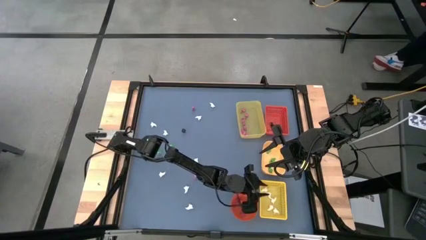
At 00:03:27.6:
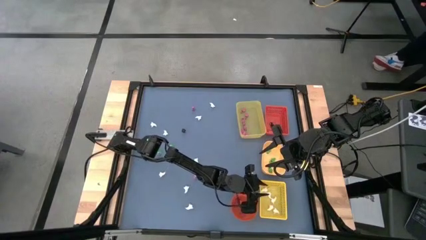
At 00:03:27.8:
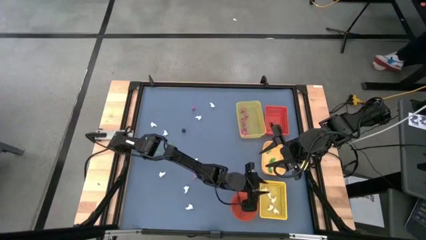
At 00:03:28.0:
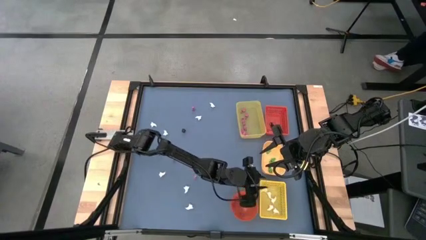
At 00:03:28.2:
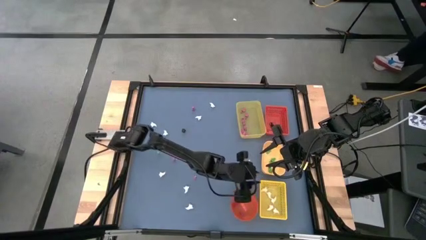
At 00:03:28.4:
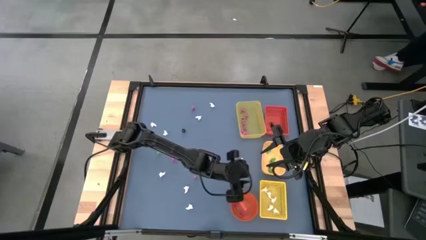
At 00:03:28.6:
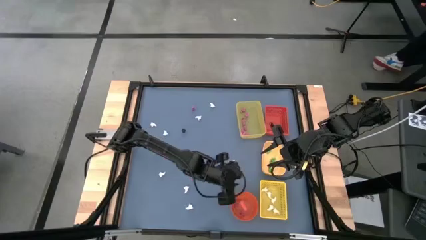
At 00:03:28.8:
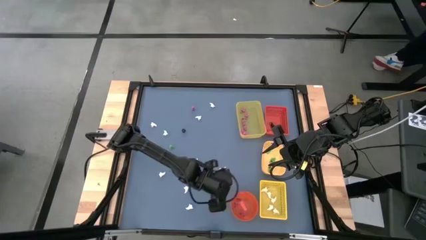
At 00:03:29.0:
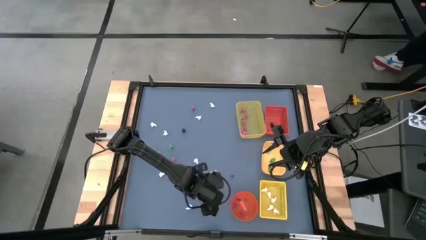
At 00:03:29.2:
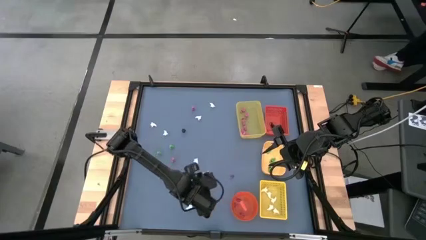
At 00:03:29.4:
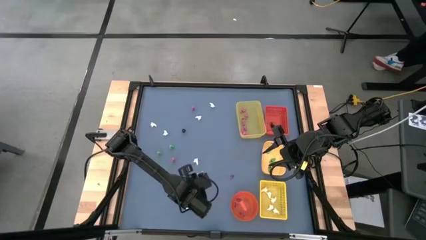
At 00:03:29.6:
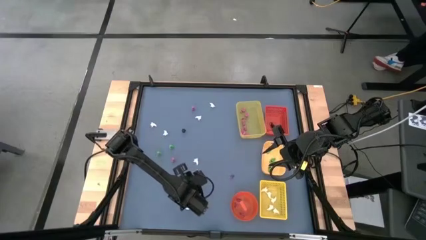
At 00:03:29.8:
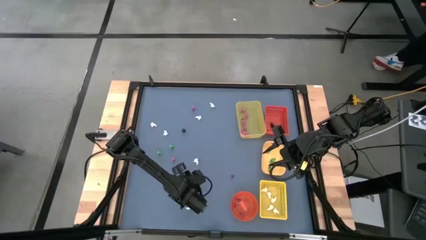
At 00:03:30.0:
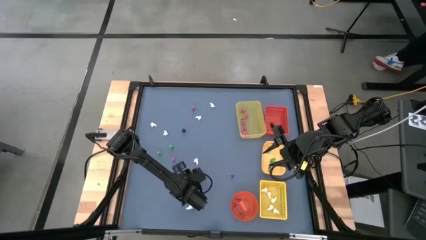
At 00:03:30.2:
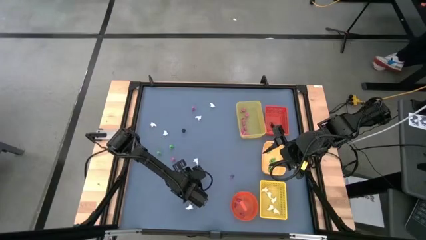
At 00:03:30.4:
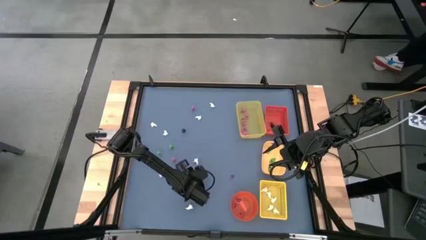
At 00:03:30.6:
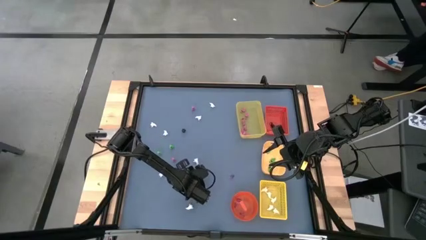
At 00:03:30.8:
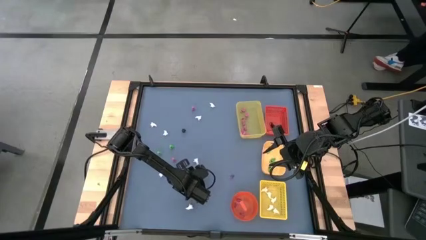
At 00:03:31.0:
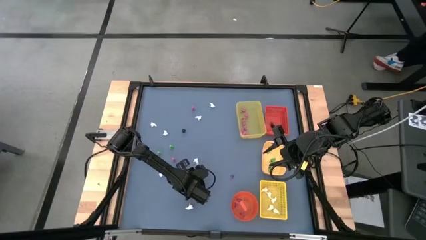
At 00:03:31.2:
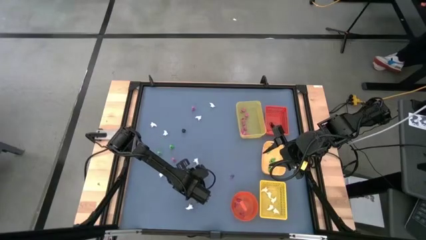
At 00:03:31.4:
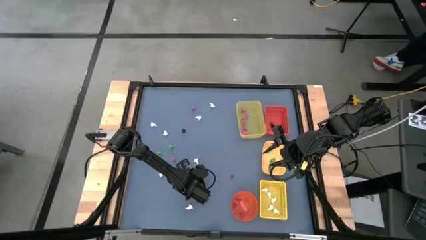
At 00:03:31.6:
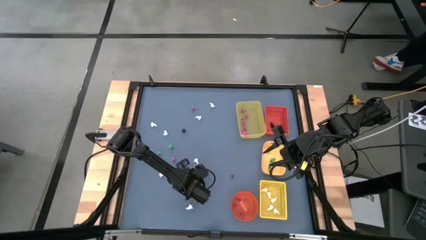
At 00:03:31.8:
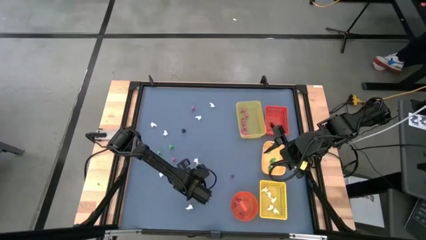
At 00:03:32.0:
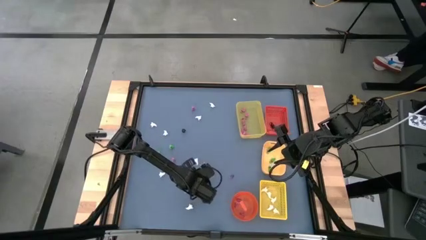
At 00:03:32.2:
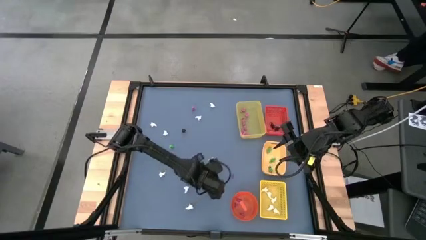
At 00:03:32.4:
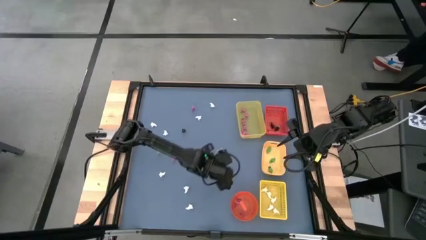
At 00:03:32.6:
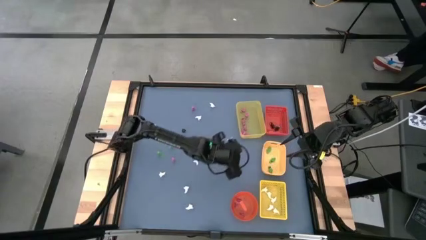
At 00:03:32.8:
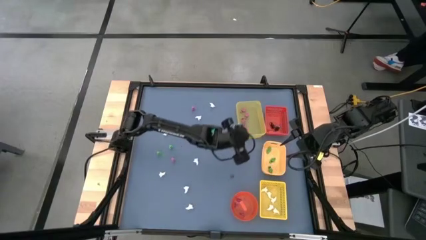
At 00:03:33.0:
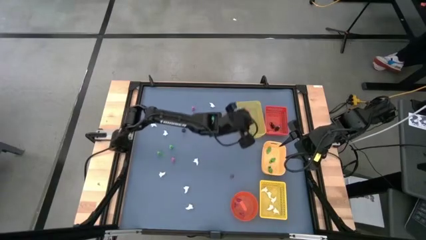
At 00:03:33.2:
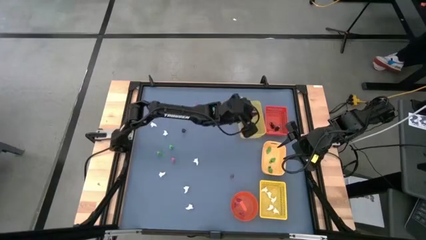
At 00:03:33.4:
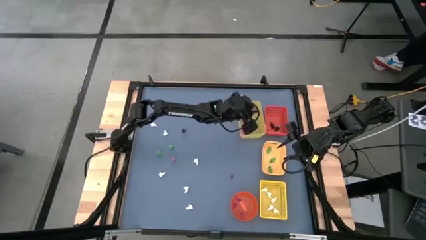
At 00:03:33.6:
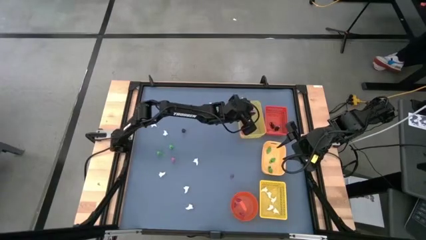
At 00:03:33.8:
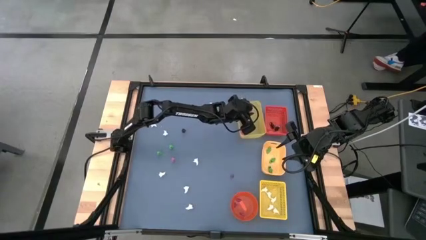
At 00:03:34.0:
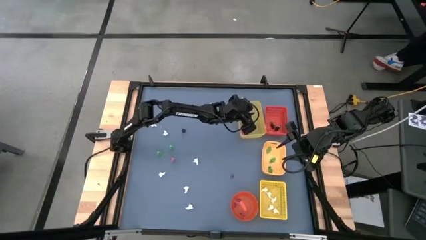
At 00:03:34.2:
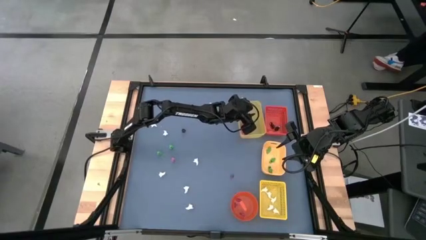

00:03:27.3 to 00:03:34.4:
Task: Sort Halloween decoration
Put the pink skeleton toy into the top yellow bin

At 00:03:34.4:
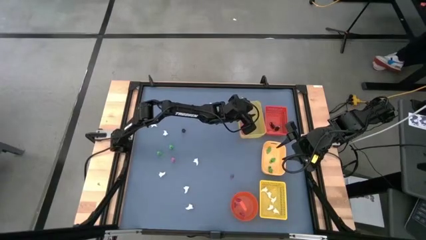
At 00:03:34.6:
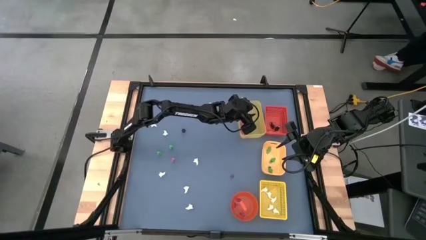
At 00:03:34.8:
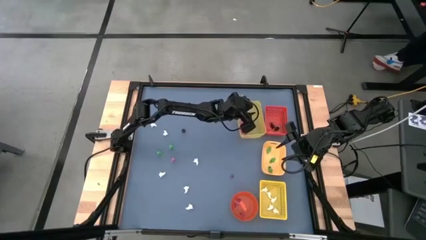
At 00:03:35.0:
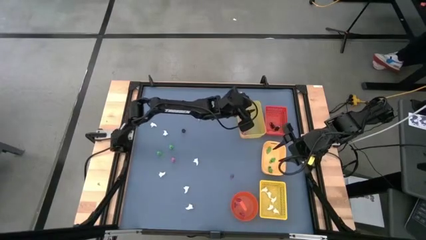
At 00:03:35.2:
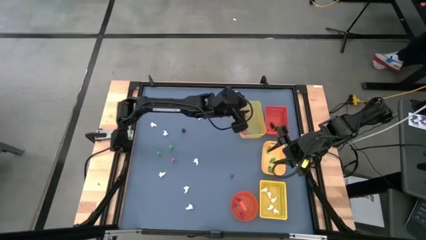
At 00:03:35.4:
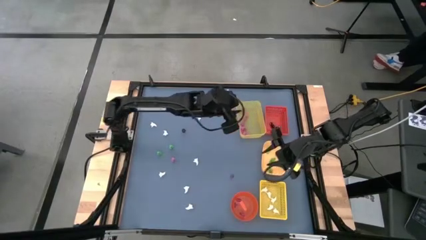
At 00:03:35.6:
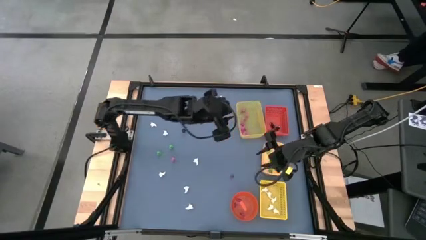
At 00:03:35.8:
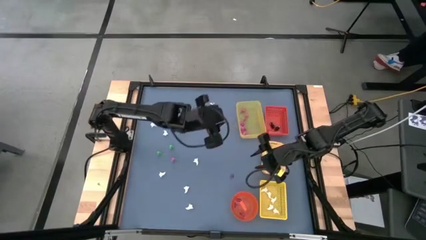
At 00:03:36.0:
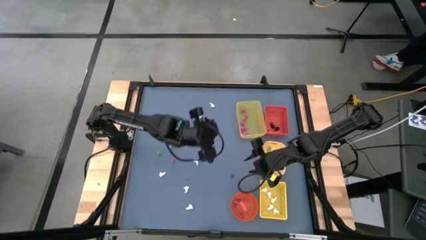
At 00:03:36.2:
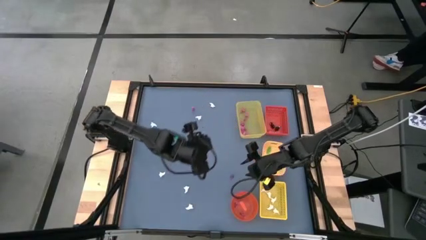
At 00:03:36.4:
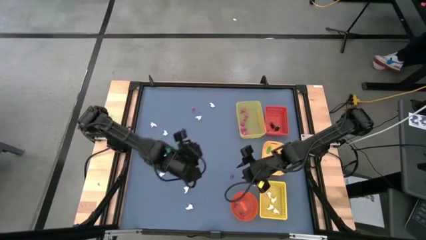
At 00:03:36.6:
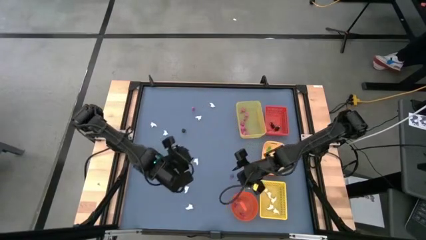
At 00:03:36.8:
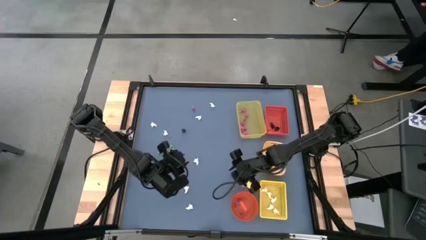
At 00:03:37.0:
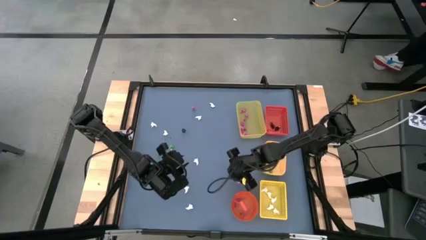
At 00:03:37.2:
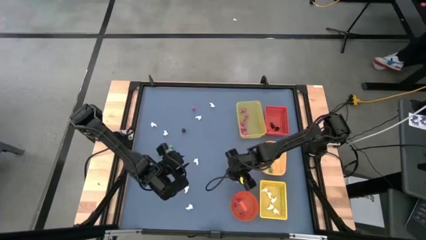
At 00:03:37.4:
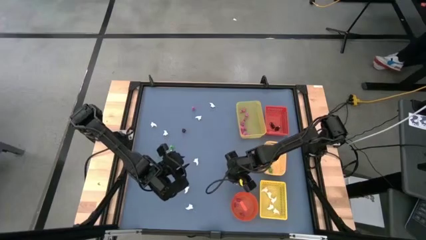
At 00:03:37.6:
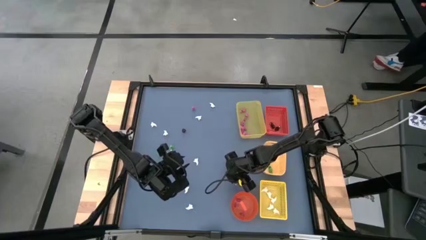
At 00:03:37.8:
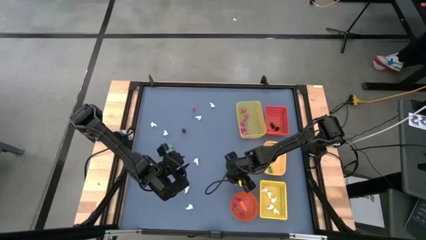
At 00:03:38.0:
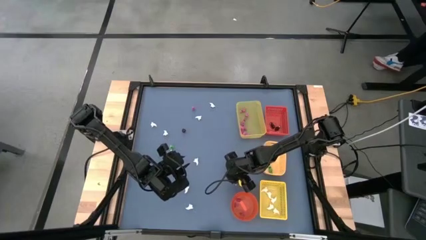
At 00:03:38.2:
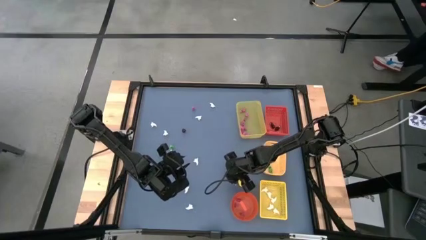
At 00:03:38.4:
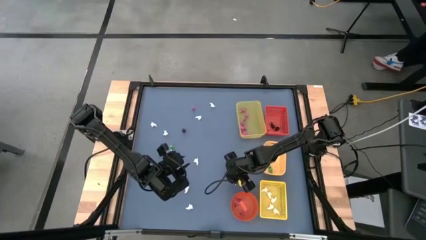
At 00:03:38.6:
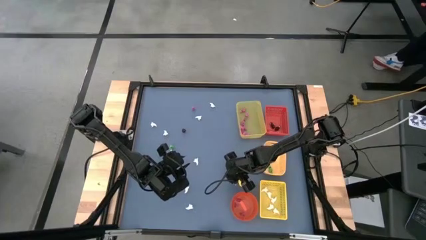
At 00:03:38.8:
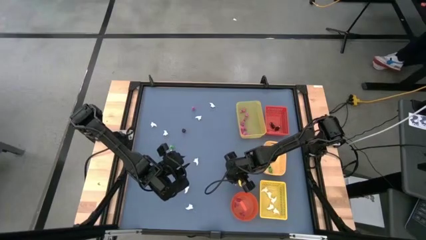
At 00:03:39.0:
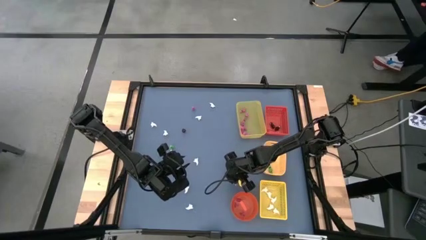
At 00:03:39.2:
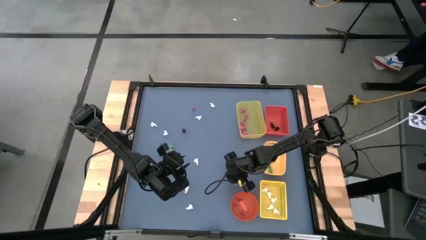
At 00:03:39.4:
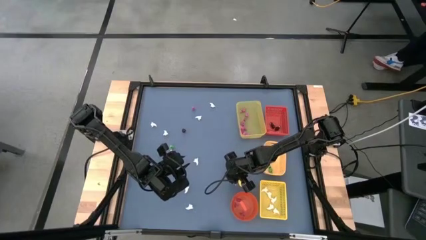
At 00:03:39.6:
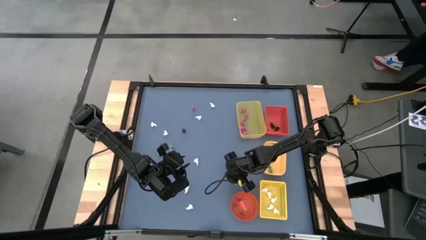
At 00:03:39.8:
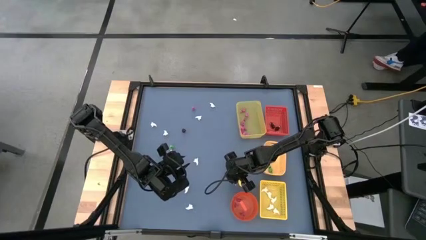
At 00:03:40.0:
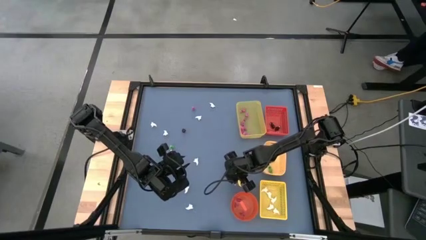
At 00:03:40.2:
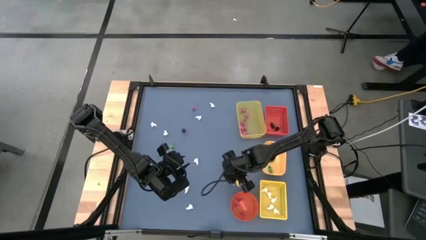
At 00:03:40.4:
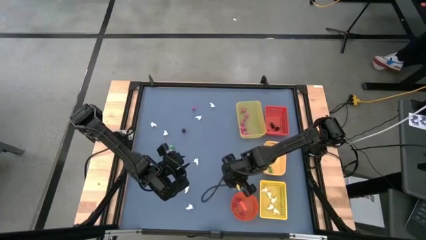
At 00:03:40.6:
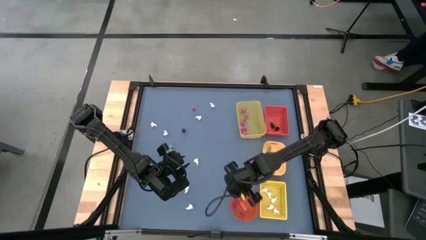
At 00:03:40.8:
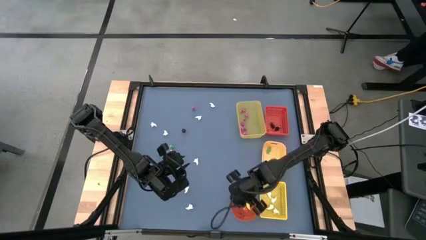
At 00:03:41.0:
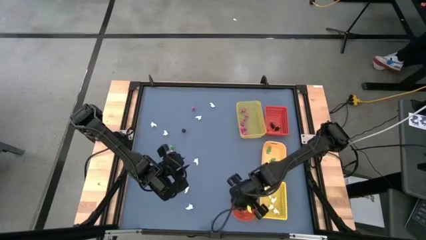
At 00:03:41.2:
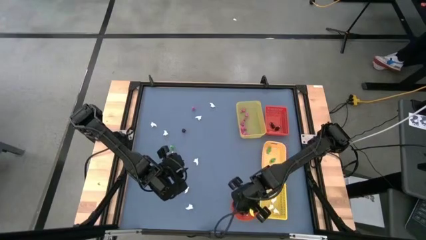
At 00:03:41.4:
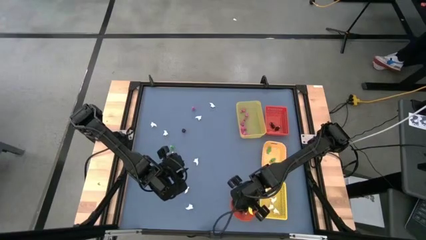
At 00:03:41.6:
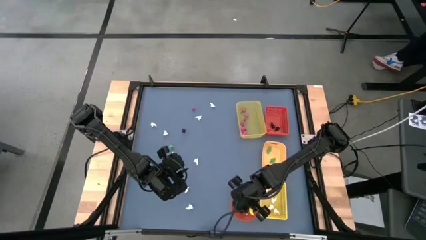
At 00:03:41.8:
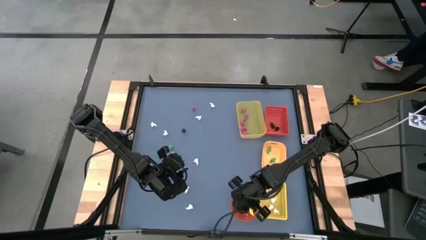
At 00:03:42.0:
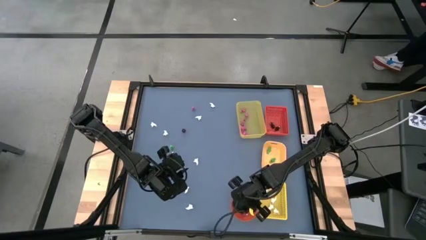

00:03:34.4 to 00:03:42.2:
Put the violet witch hat toy into the orange bin
